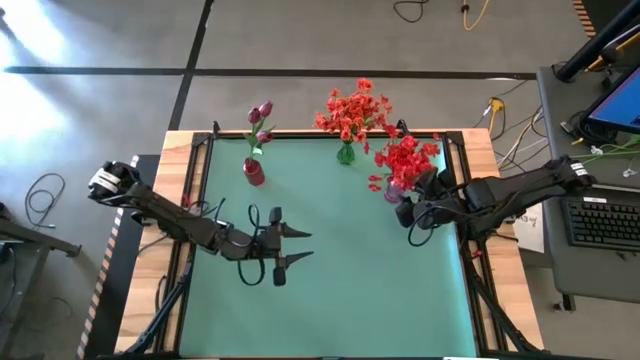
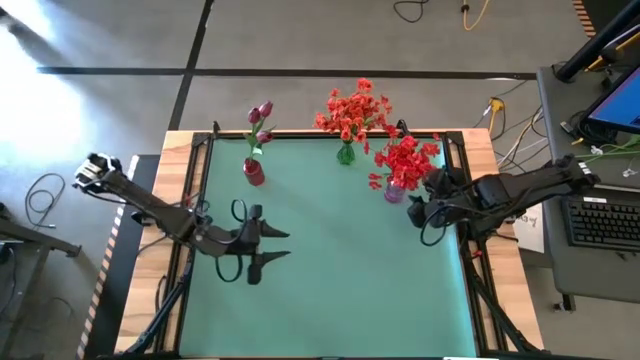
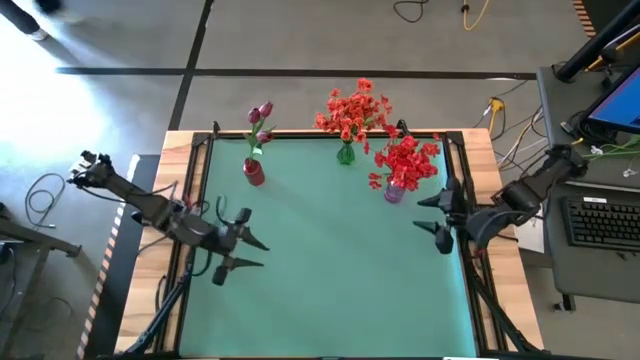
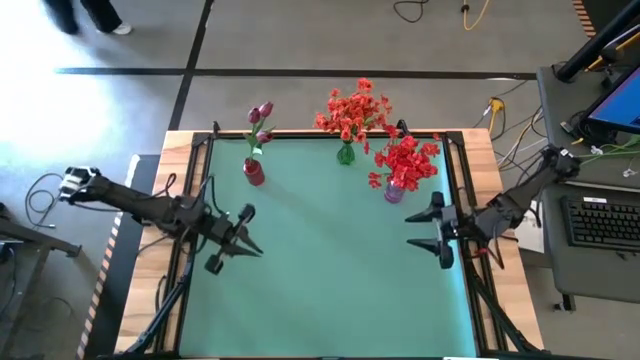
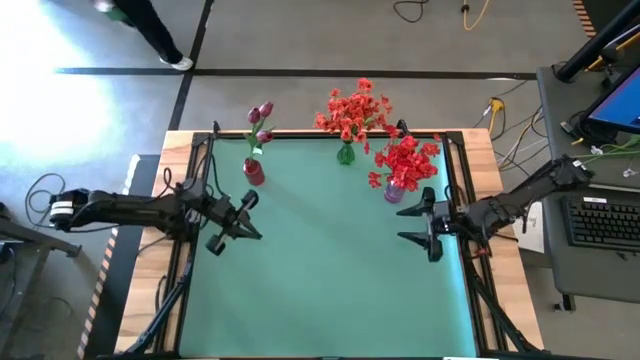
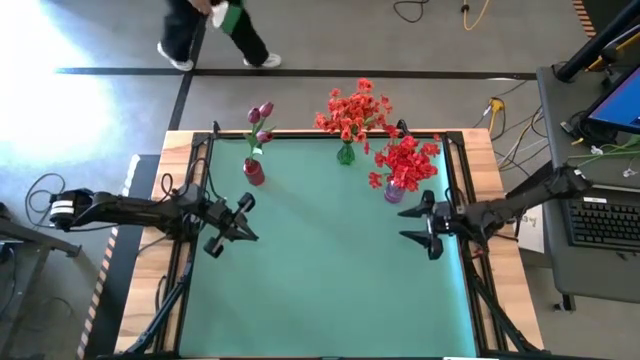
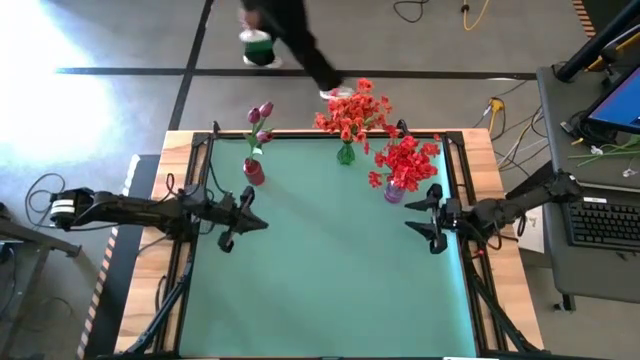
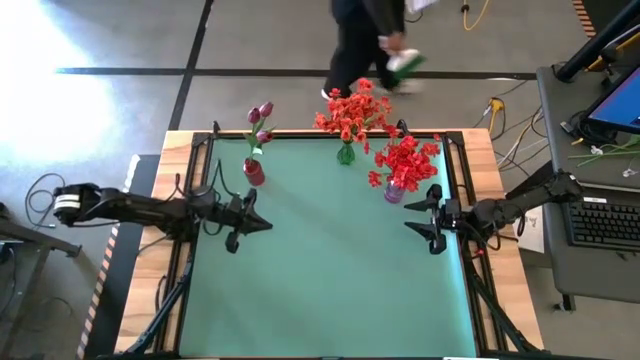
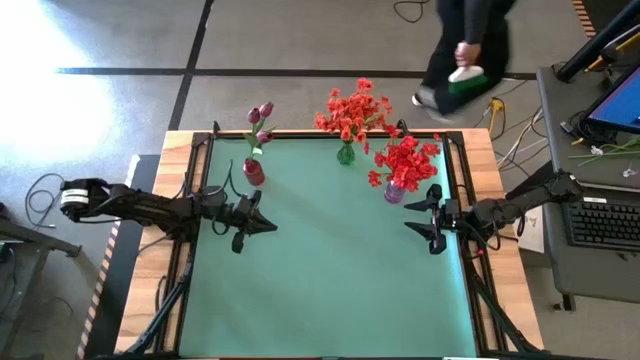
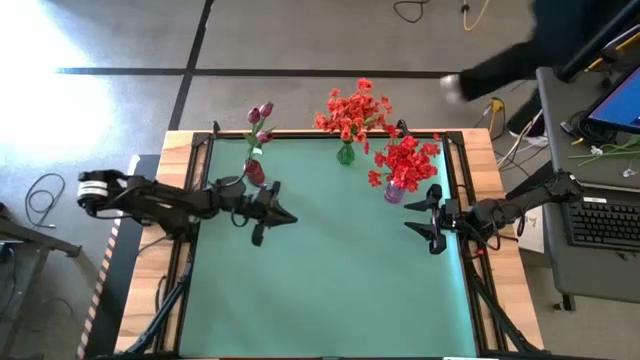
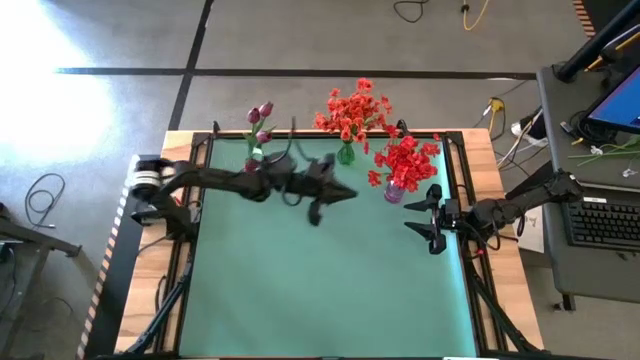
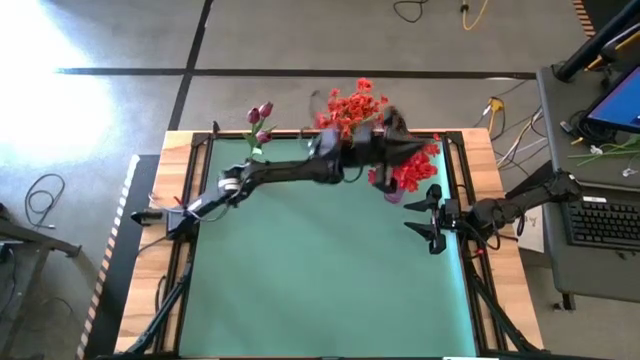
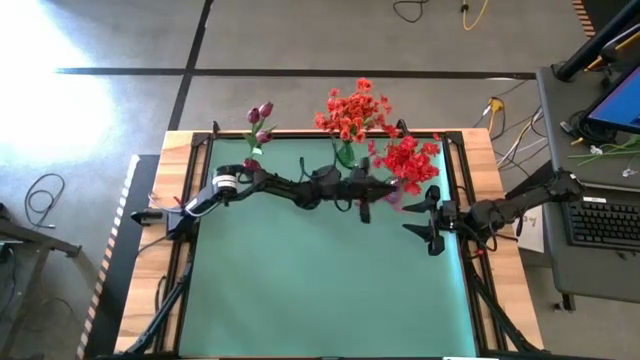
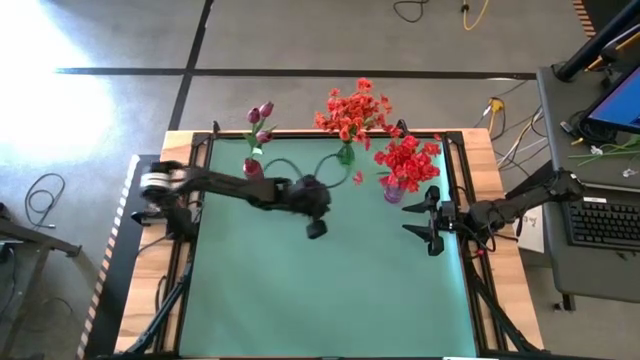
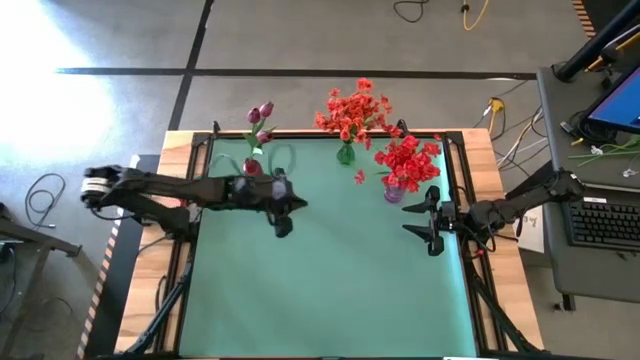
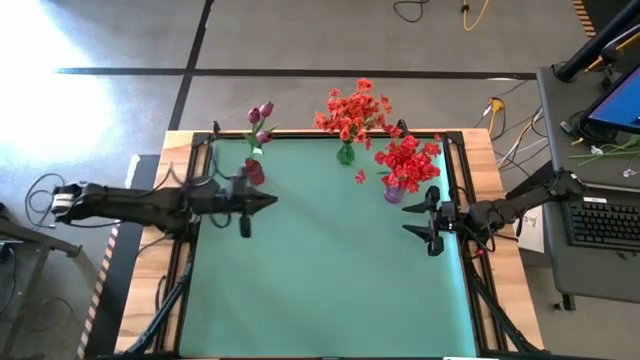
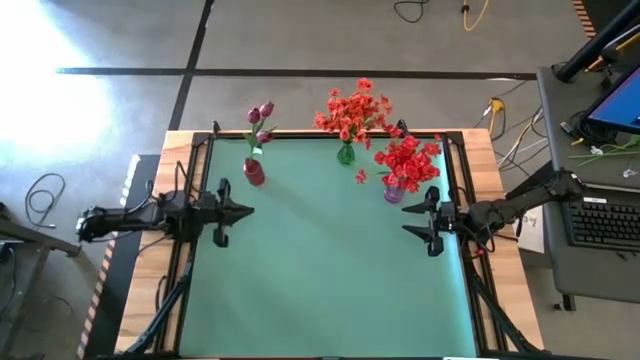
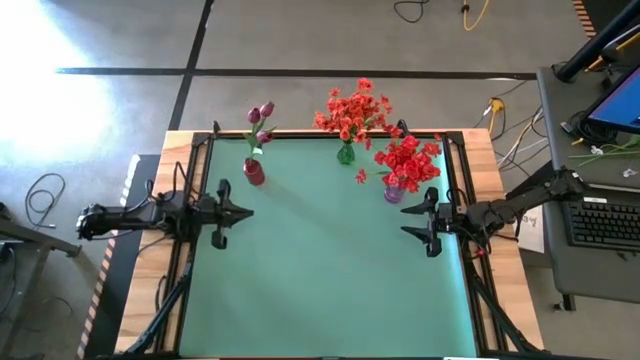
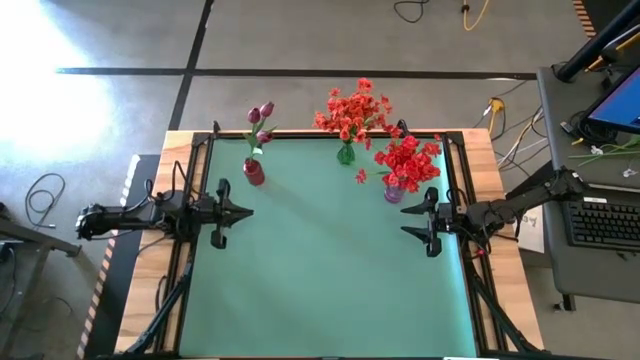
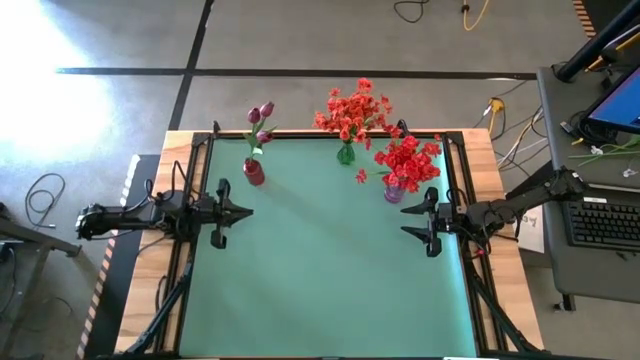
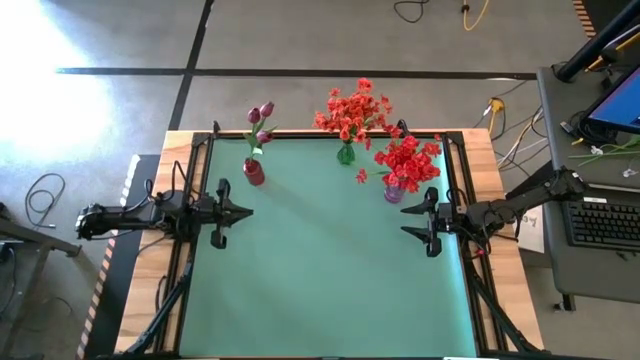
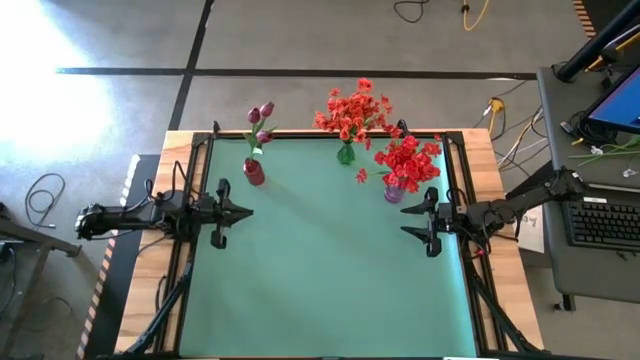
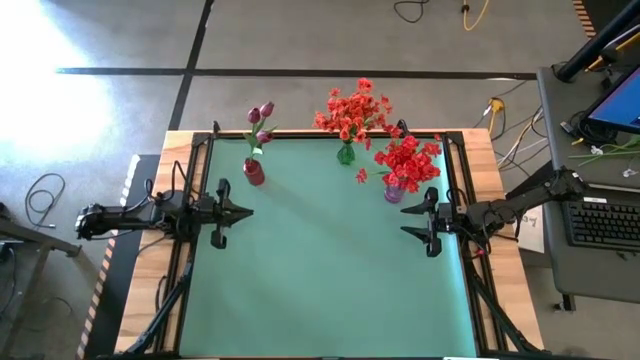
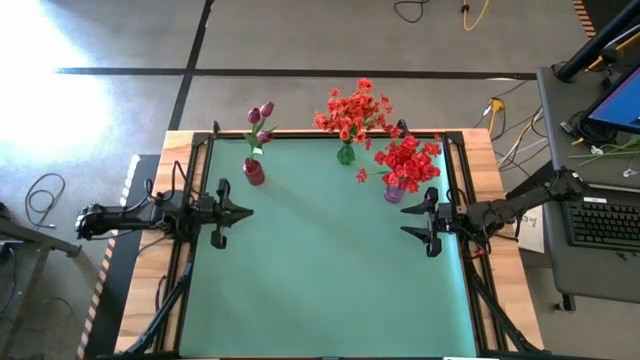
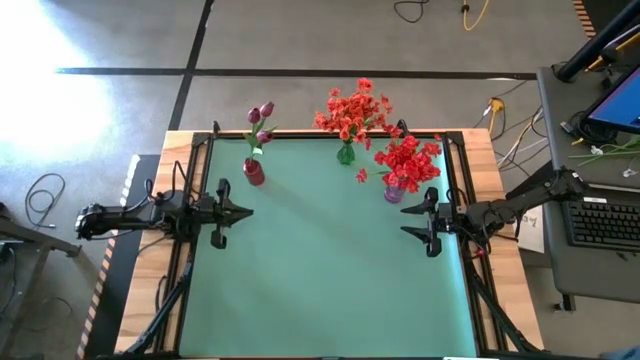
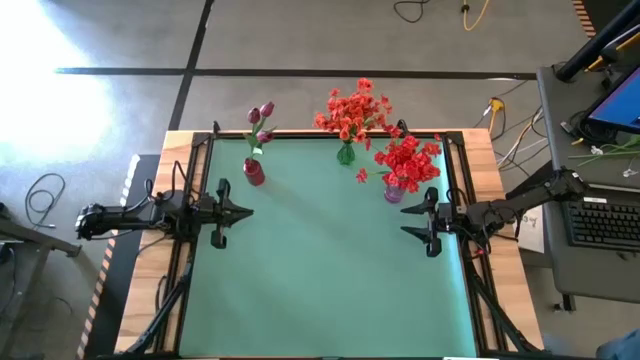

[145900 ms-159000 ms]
Task: Sort flowers into vase by color
Return to Home Position

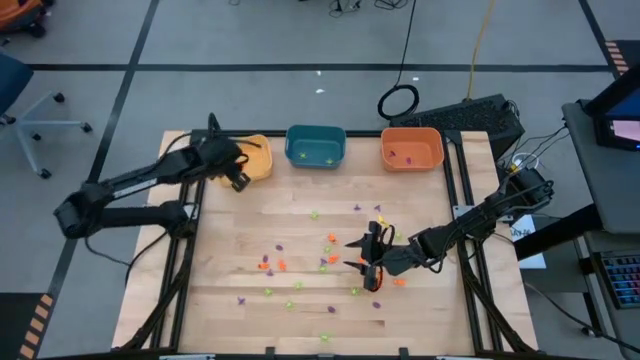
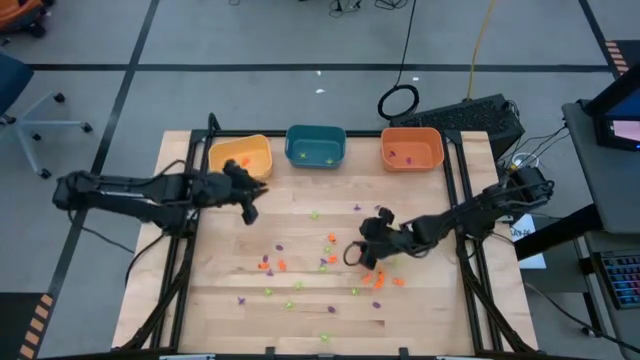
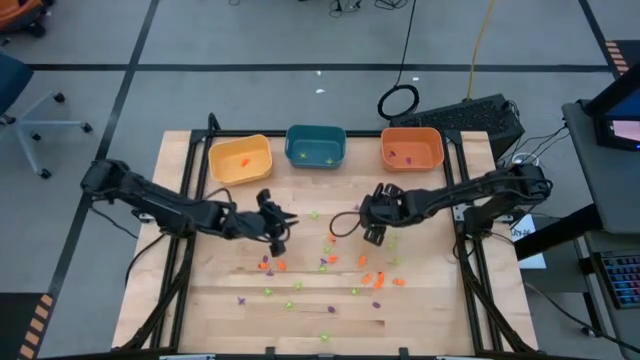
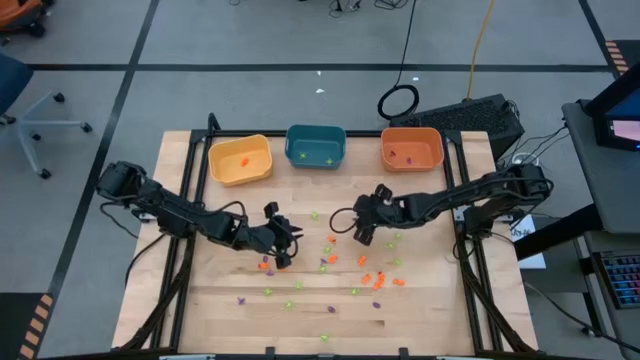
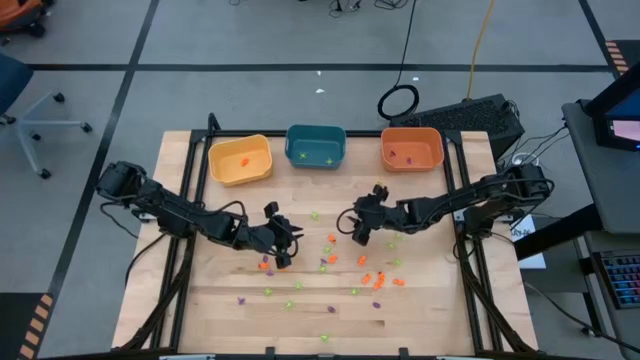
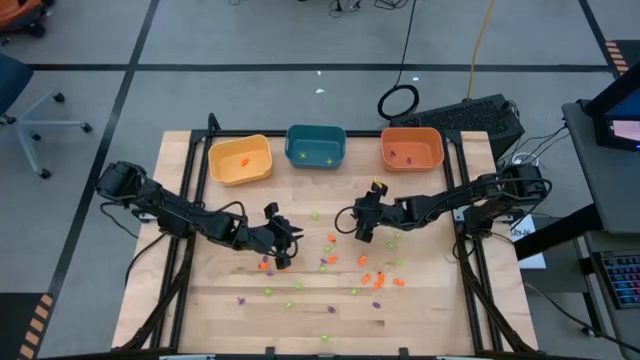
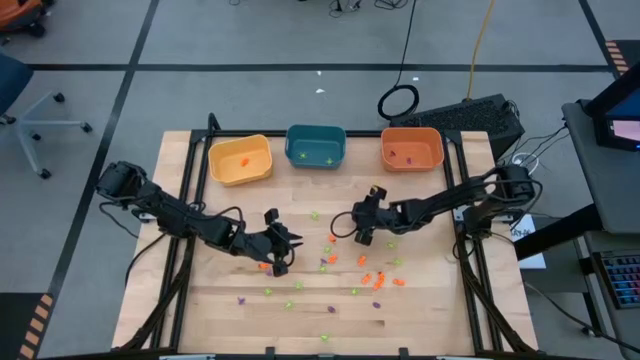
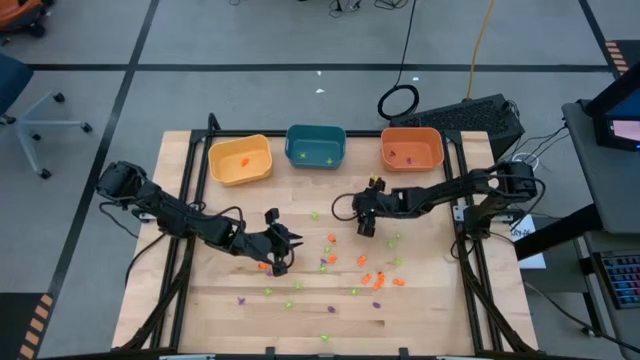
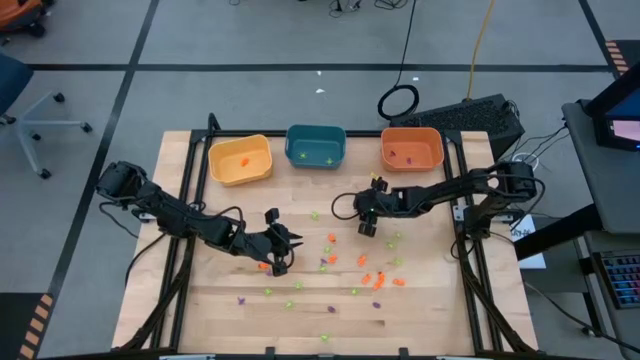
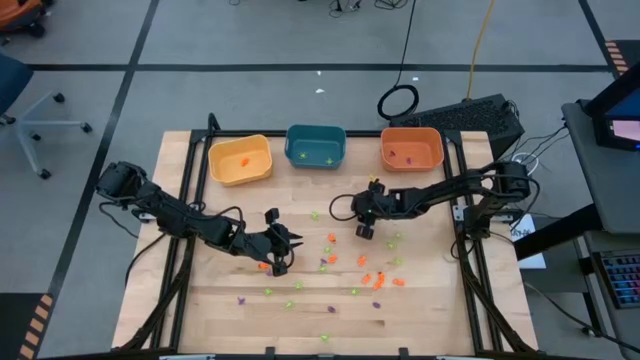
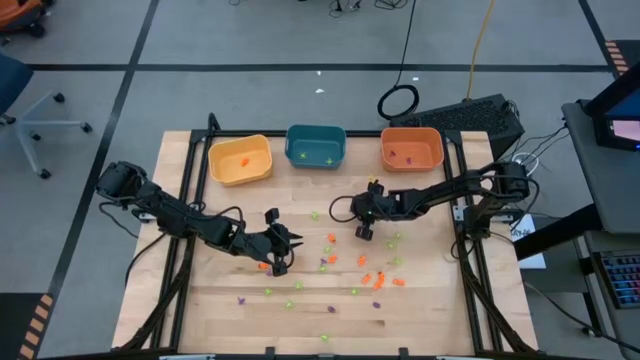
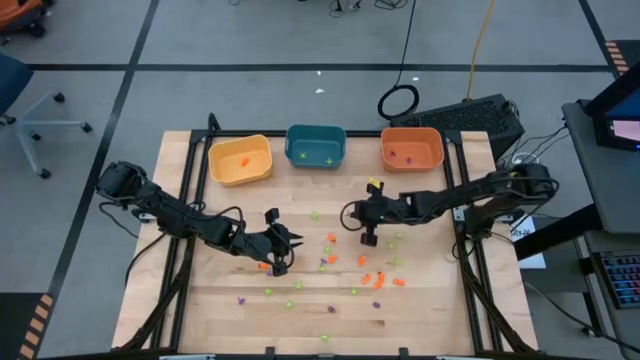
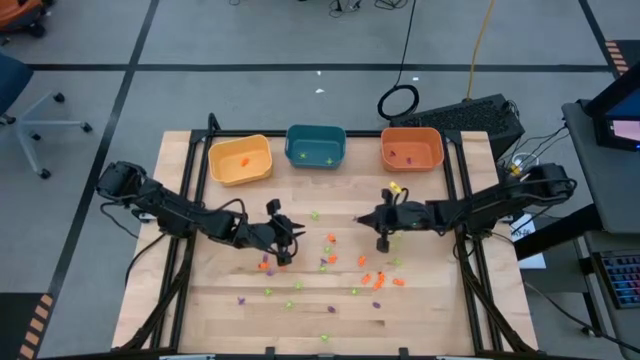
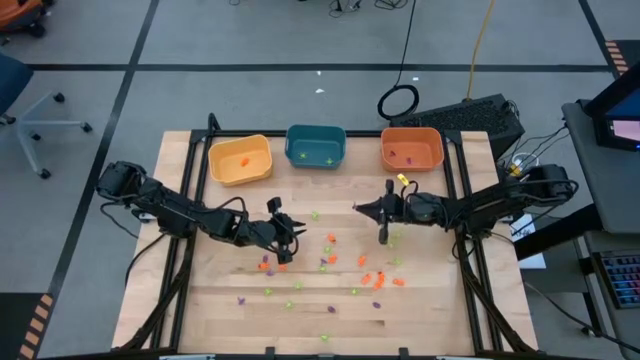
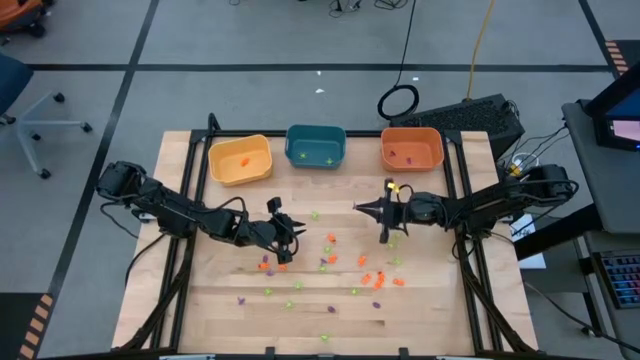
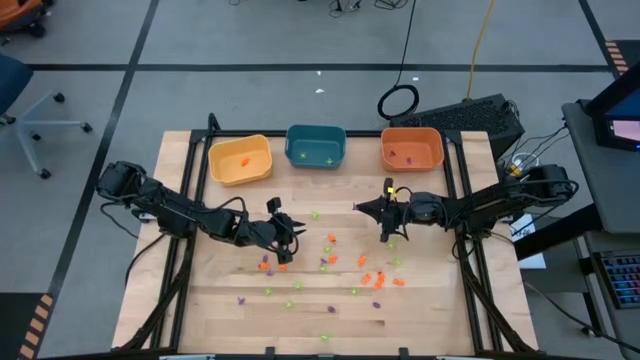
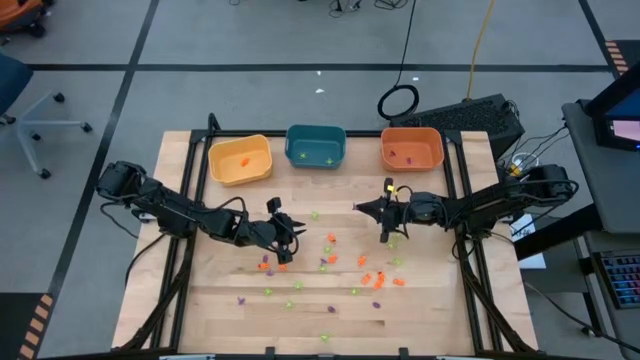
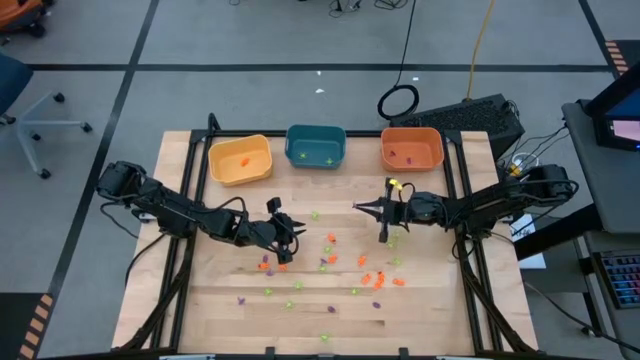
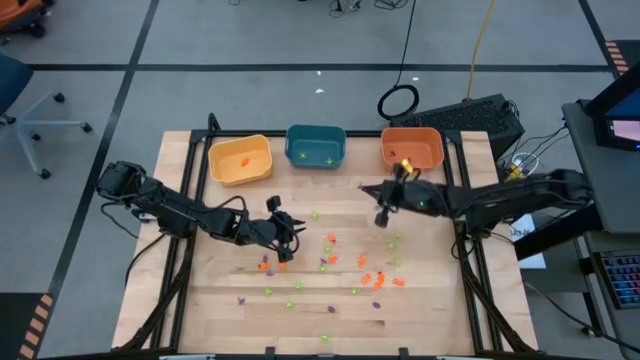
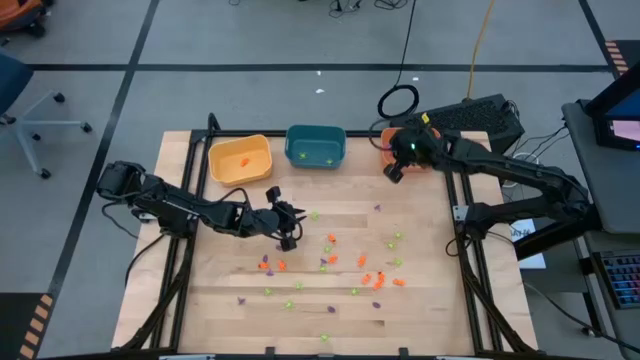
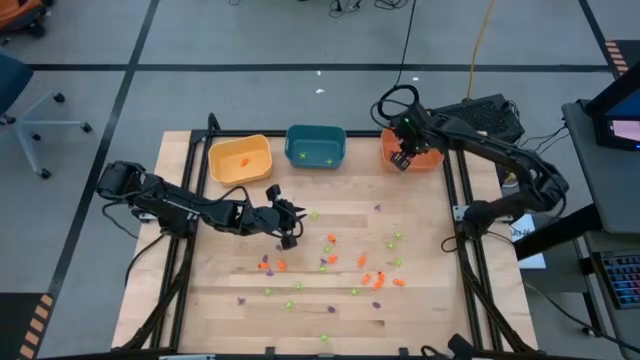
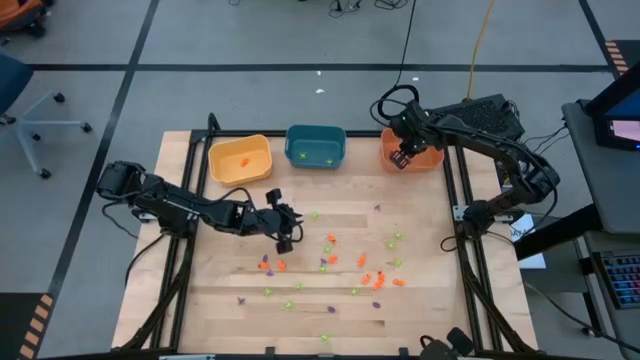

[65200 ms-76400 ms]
Task: Sort Halloween decoration
Put the violet witch hat toy into the orange bin
